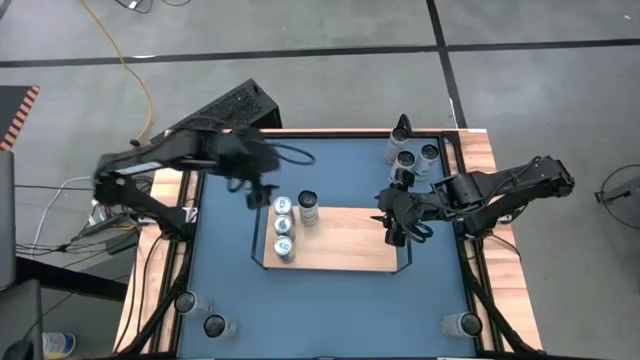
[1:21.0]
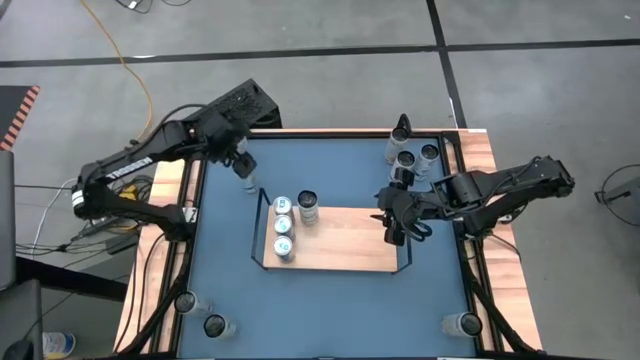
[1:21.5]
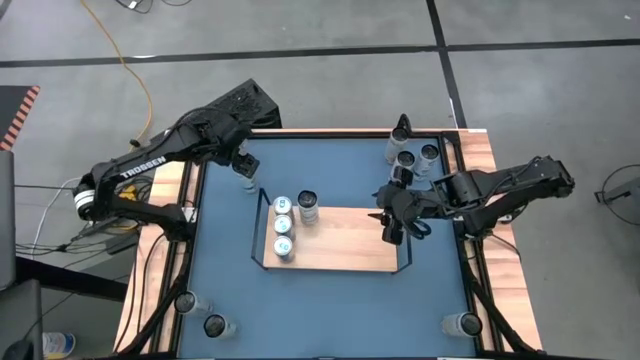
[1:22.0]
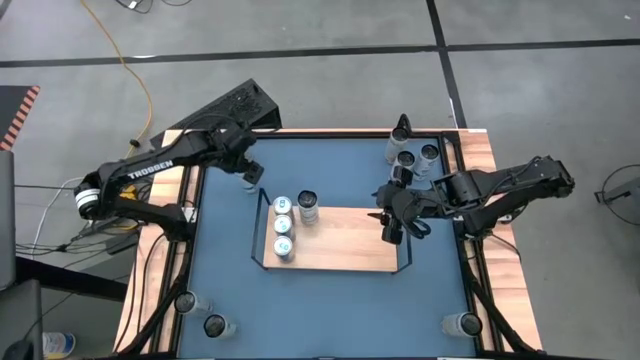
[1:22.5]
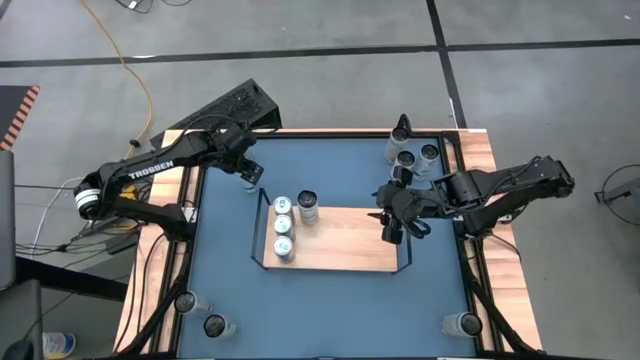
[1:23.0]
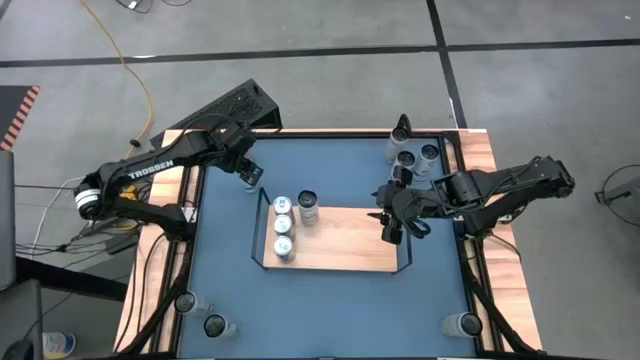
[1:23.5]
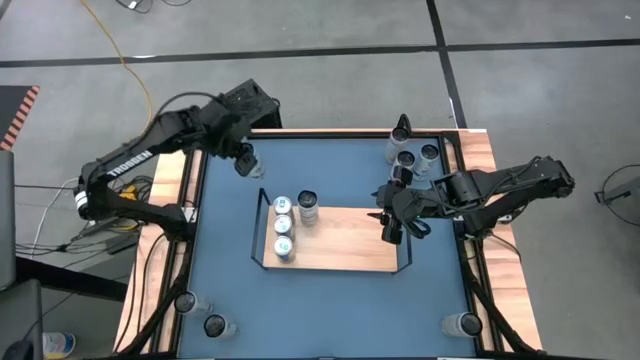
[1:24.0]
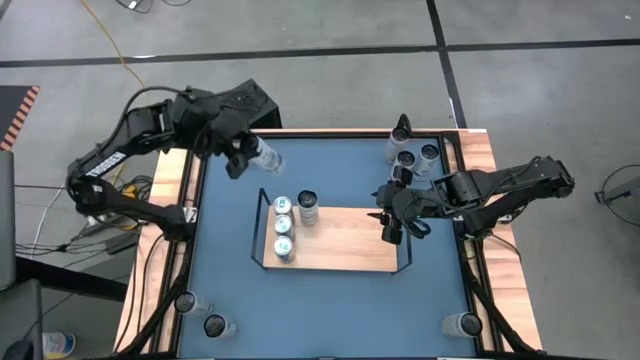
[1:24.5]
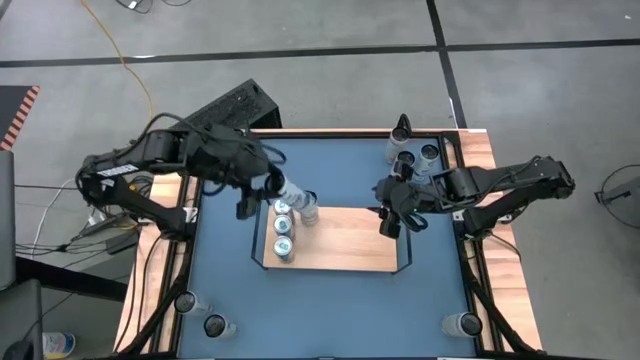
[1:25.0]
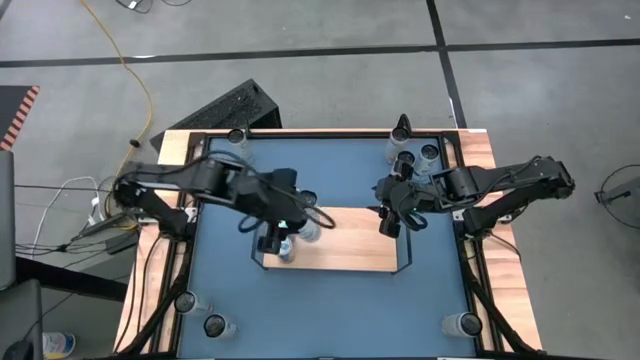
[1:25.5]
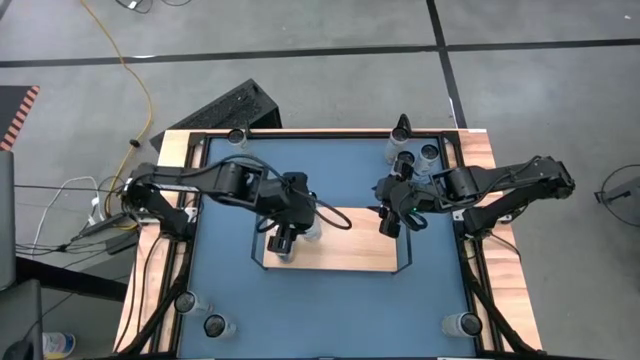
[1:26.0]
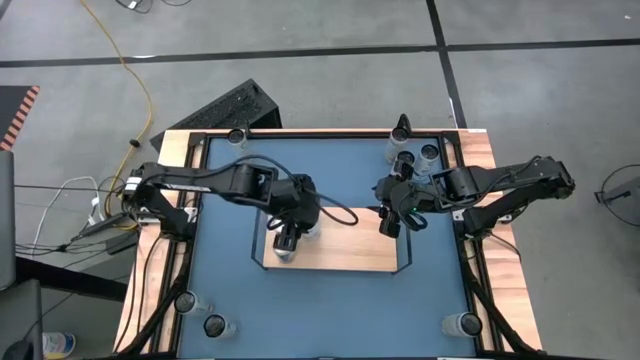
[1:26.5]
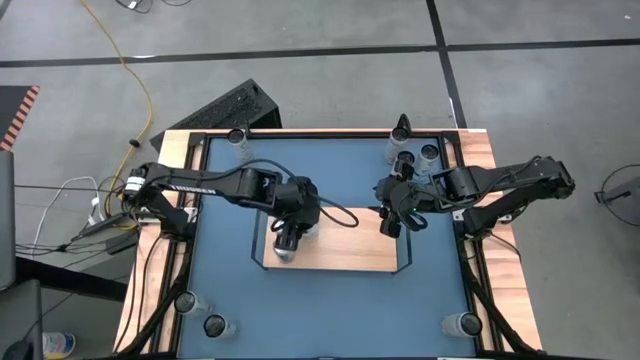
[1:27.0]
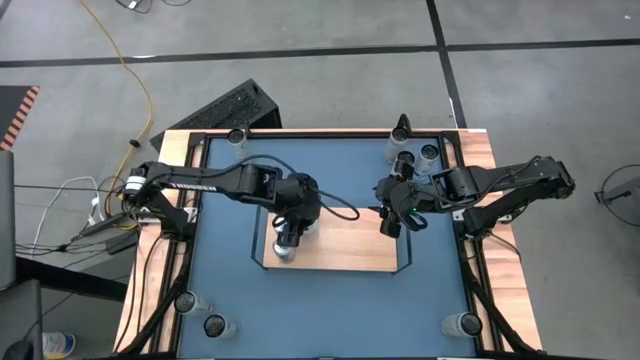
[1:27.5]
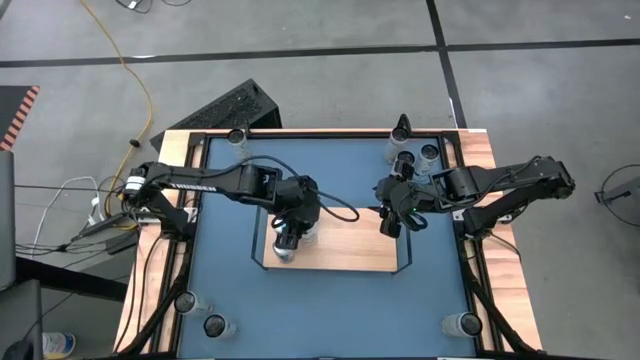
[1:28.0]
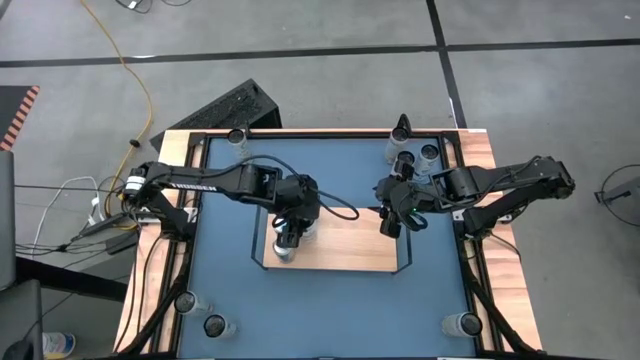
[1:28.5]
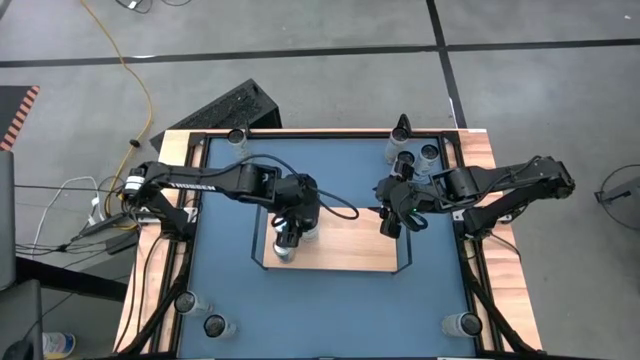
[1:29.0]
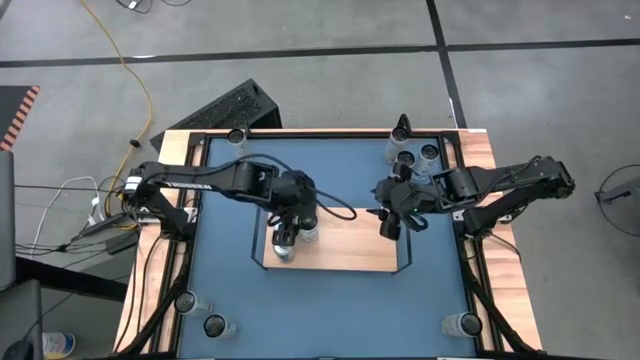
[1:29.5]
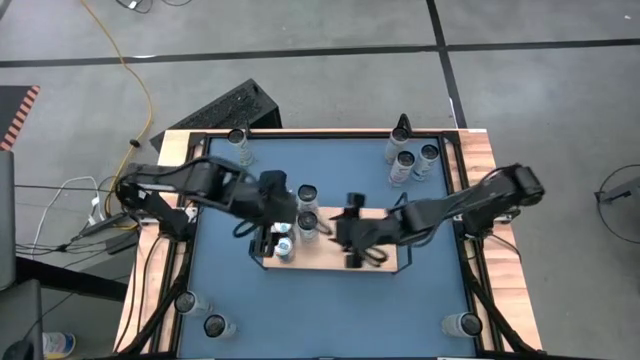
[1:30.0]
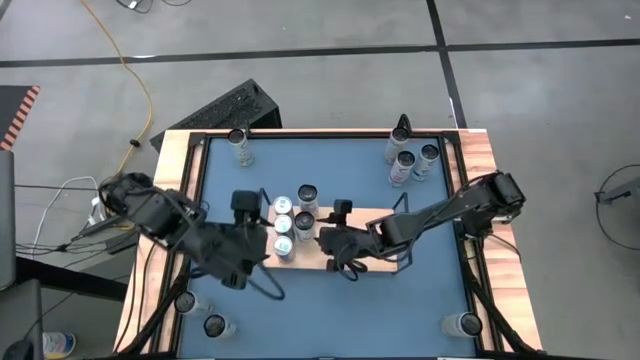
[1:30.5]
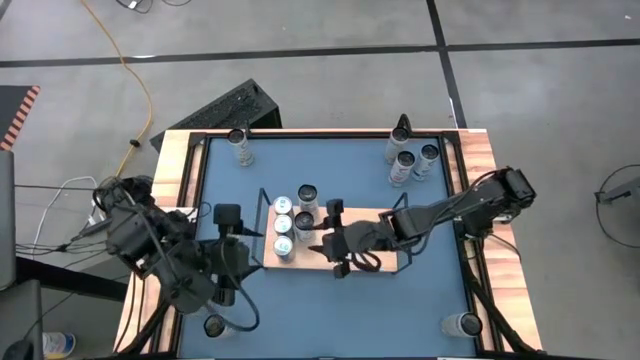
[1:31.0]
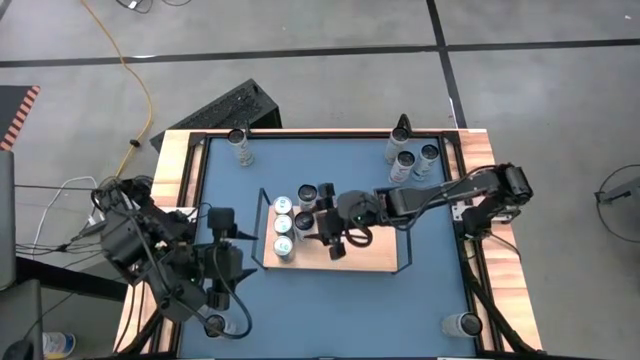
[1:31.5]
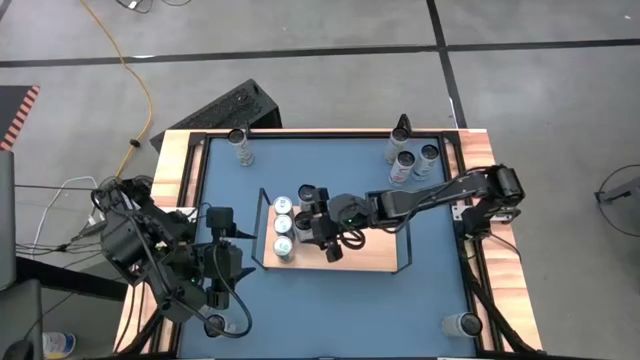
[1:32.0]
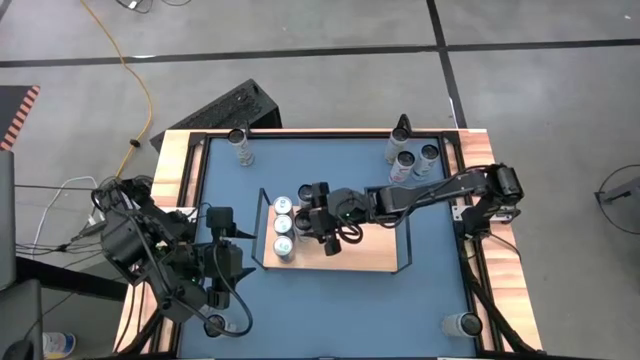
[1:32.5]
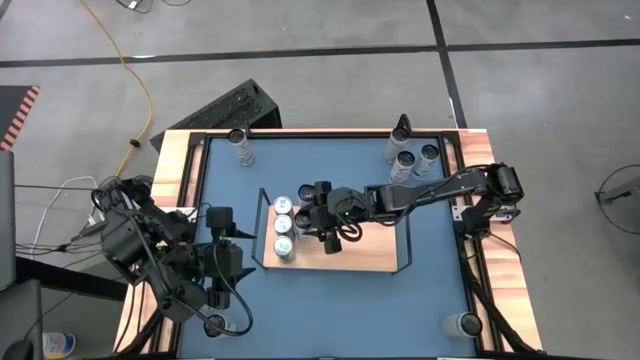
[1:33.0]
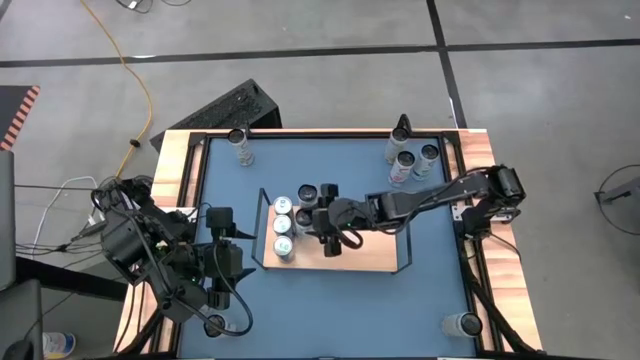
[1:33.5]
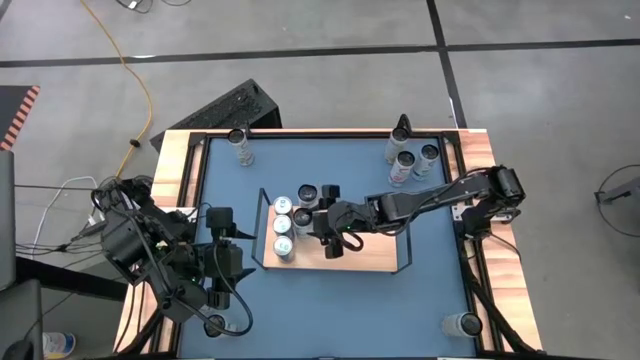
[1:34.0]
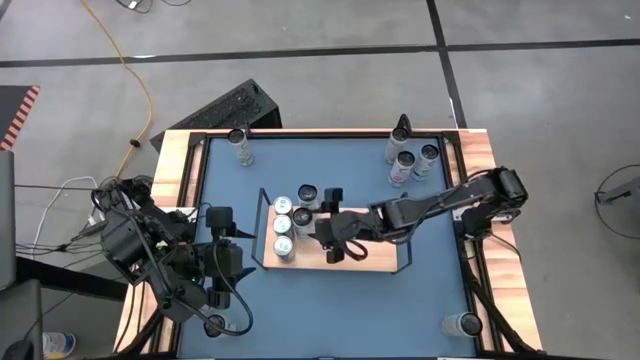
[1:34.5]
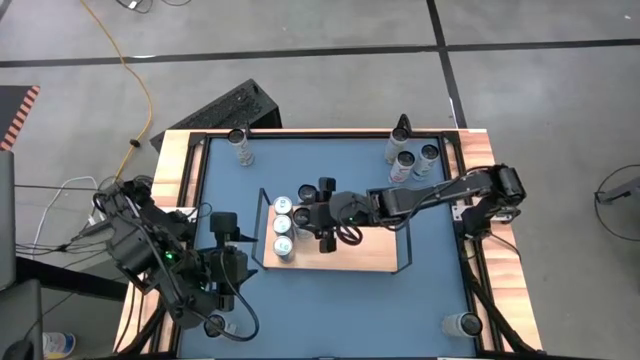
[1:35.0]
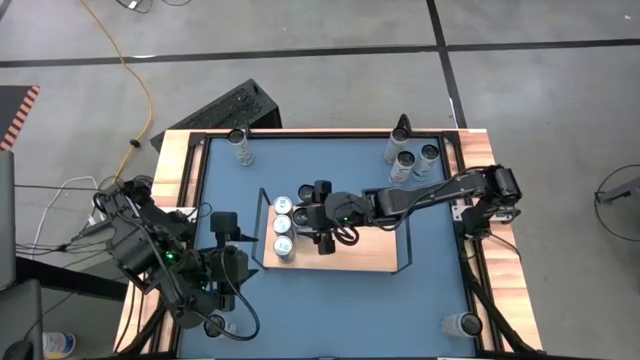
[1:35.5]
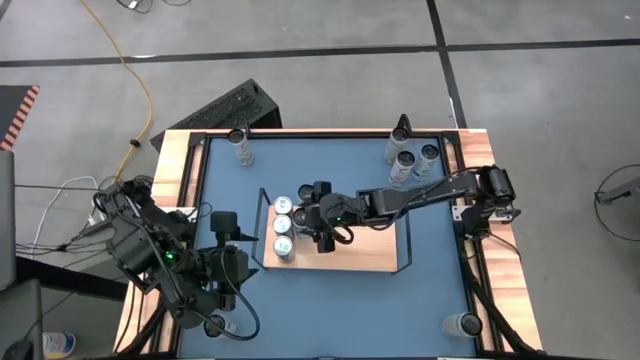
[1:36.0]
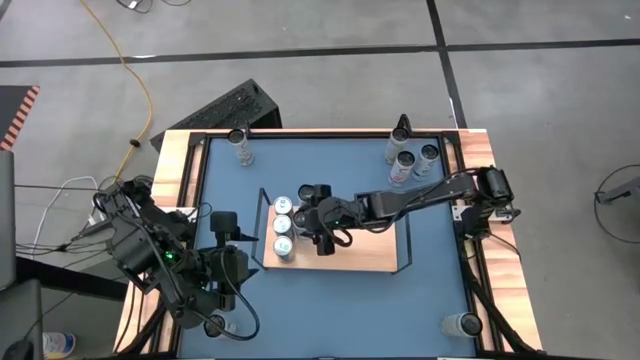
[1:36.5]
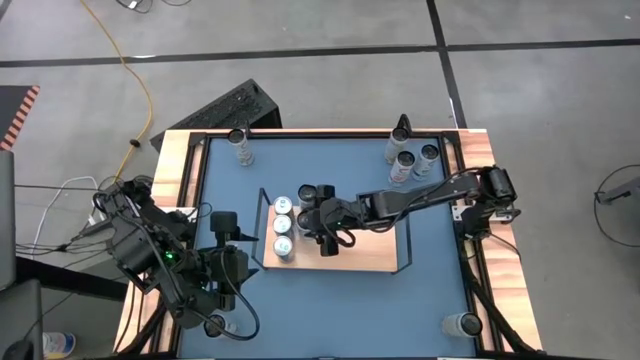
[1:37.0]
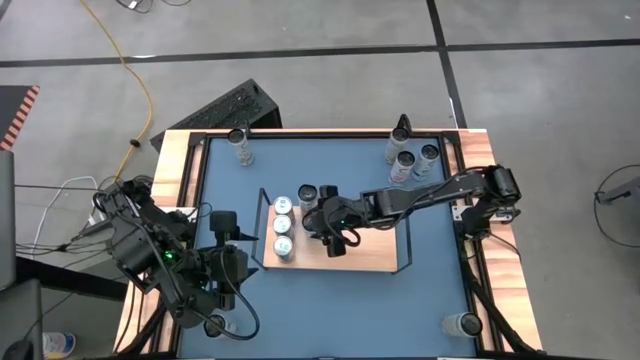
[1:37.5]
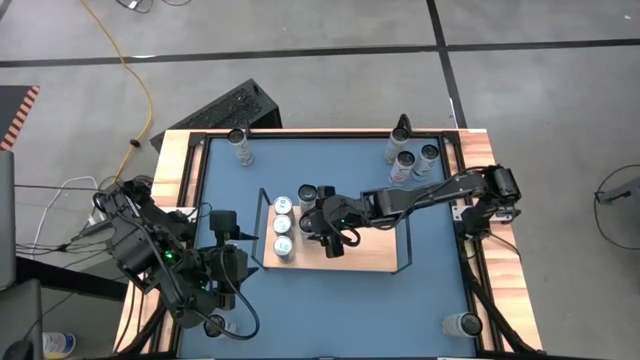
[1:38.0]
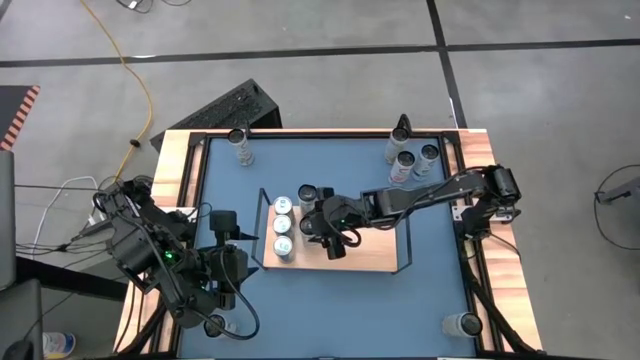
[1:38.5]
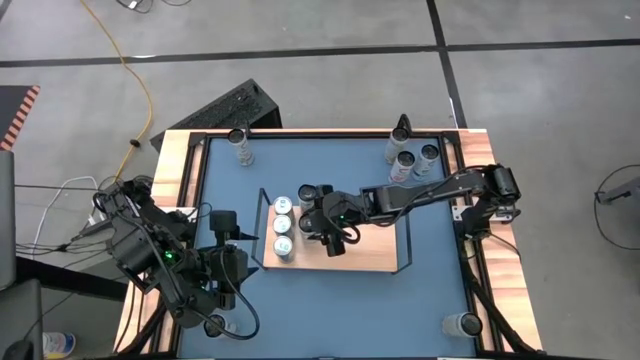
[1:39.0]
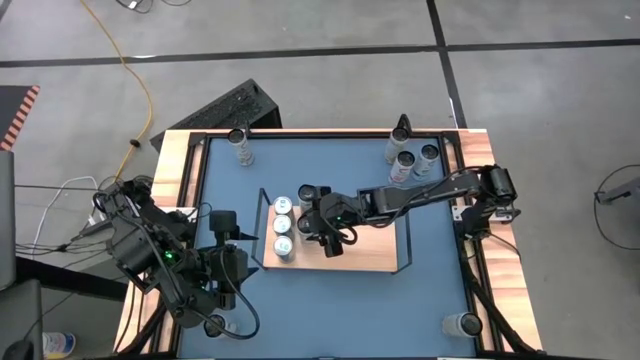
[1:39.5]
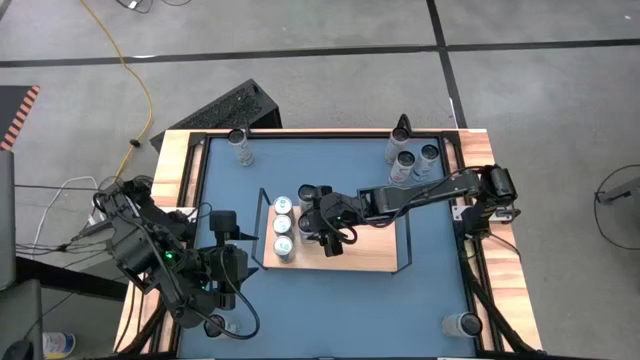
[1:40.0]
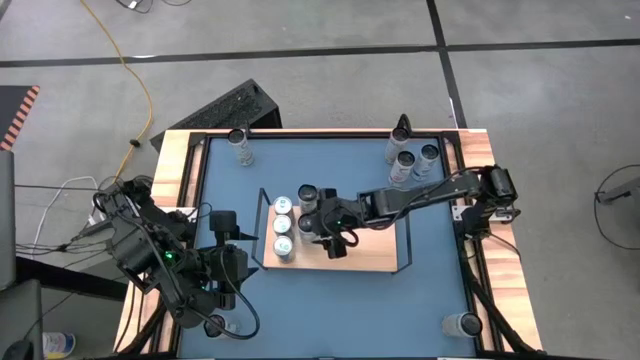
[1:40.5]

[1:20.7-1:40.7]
Task: Place canned beverage on shelf
Put the left white blue soda can on the shelf aligned with the other blue soda can

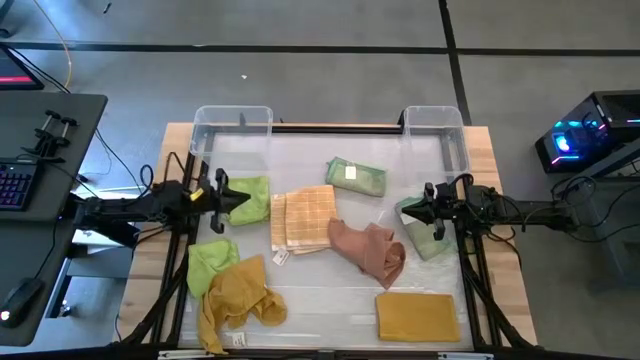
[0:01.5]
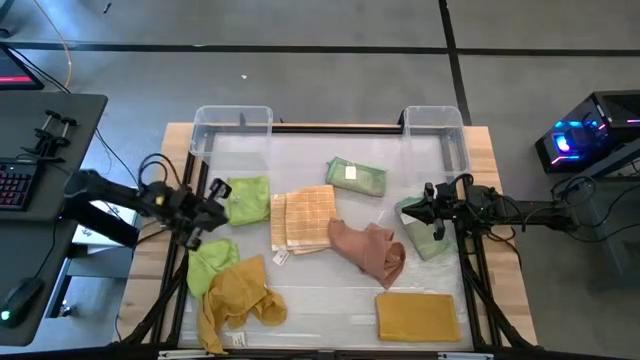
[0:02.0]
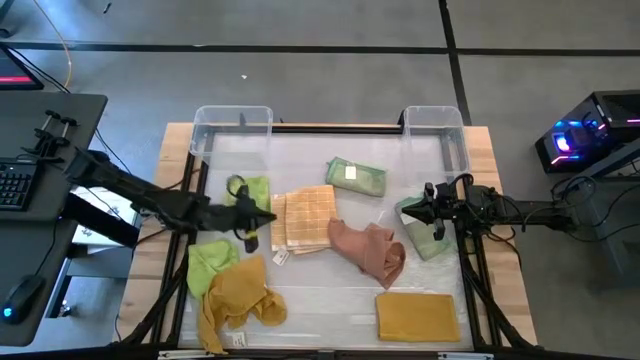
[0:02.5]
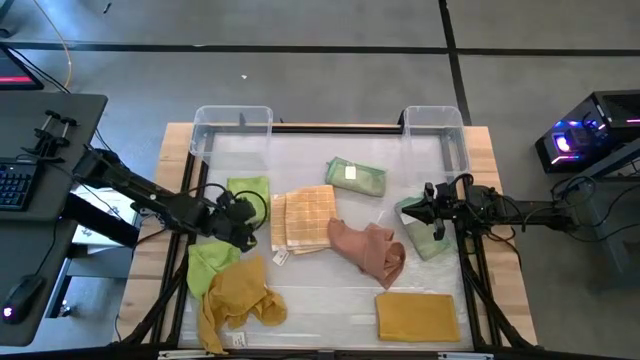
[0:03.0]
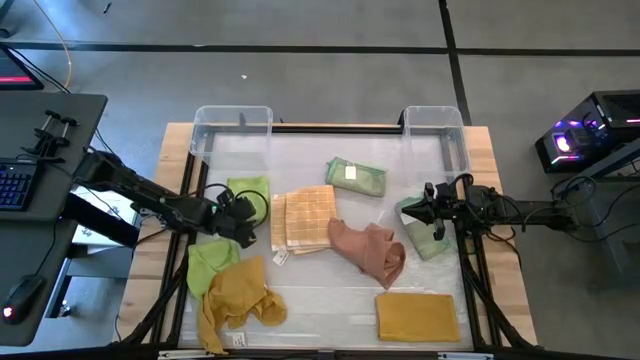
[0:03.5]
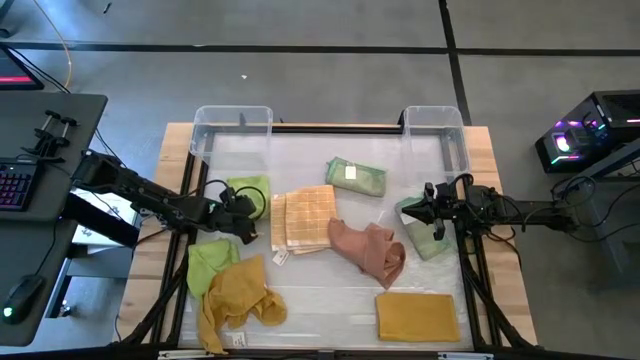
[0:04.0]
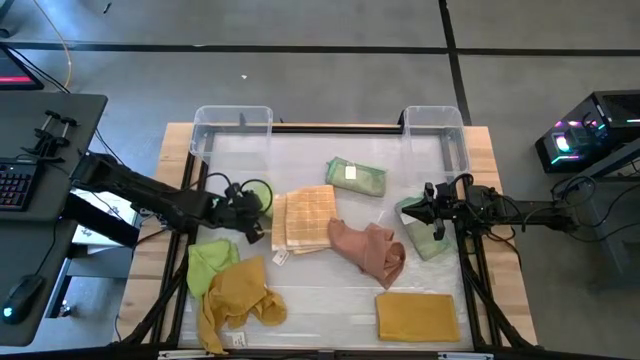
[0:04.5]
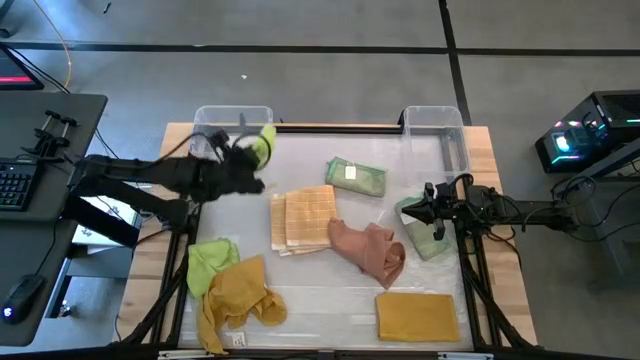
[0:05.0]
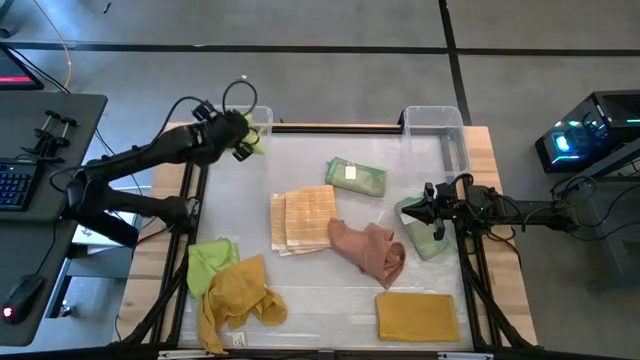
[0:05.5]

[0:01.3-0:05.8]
Task: Sort towels by color in basket
Put the top light green microfiber towel into the left transparent bin
